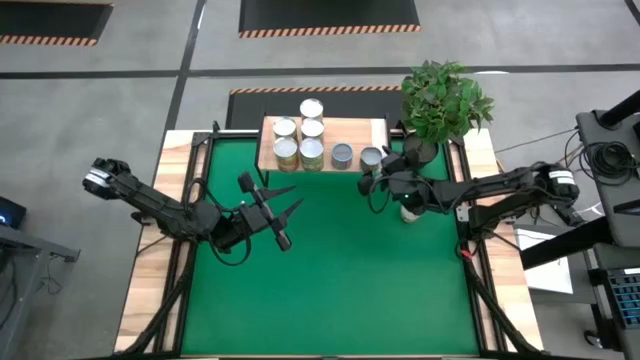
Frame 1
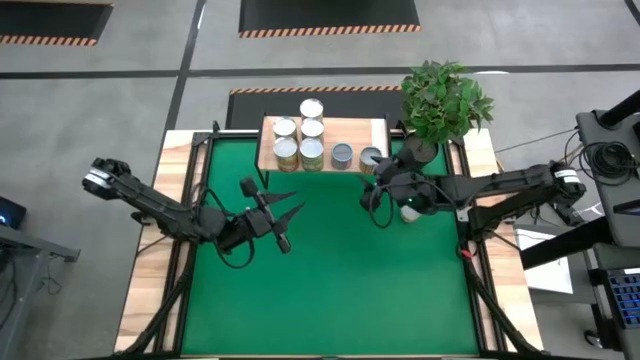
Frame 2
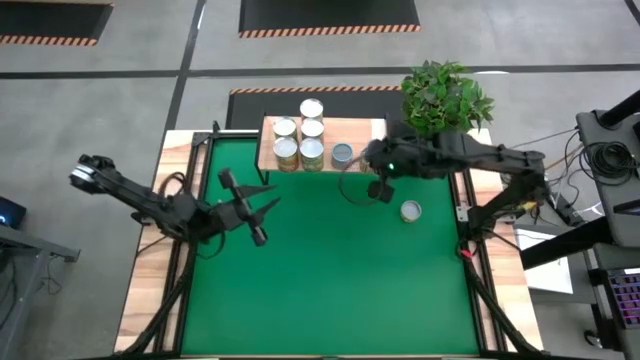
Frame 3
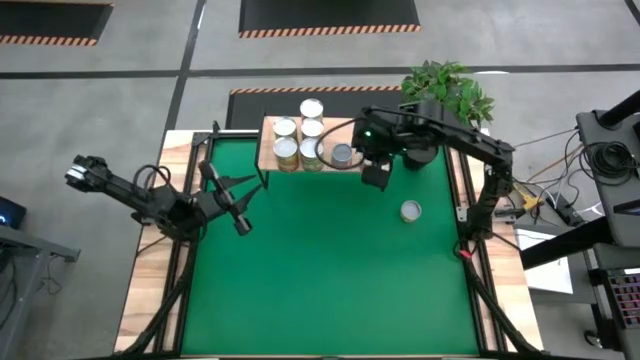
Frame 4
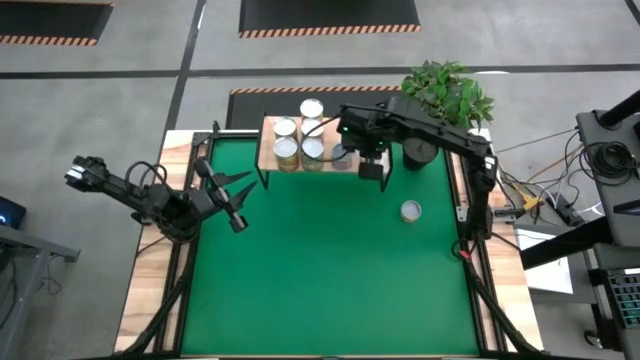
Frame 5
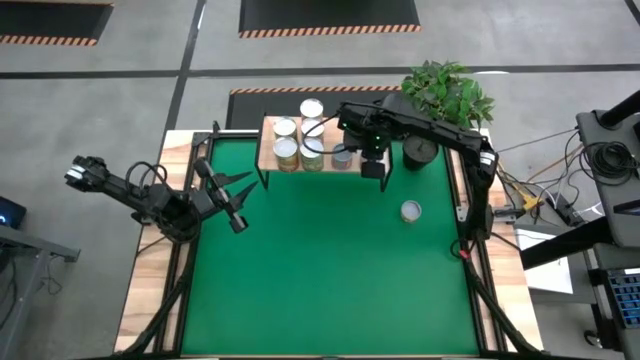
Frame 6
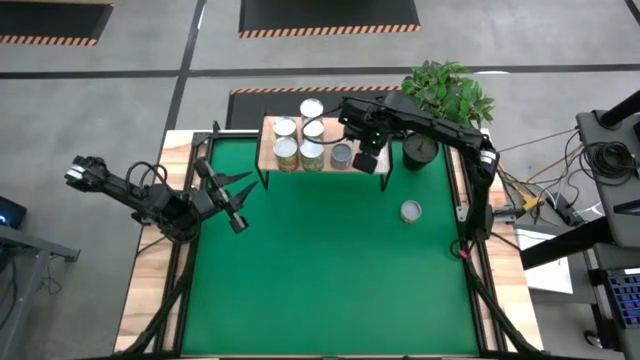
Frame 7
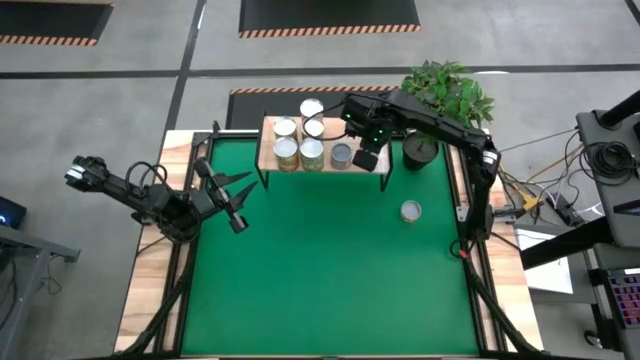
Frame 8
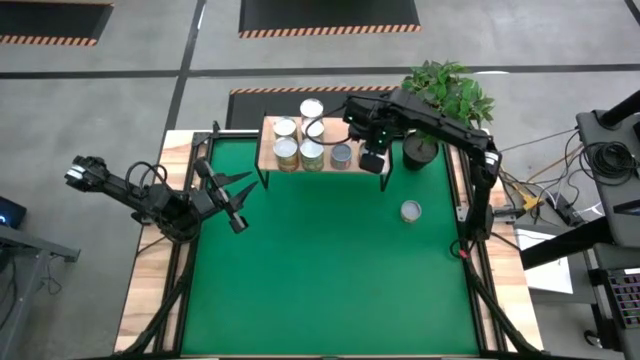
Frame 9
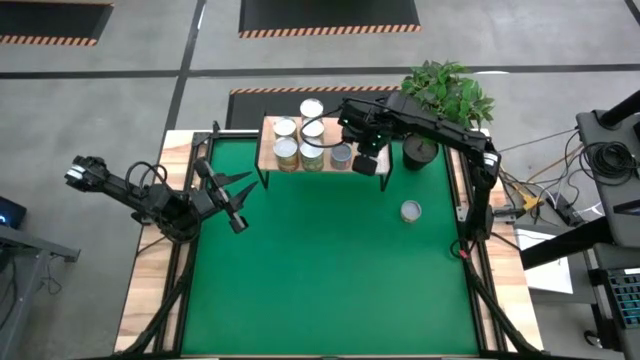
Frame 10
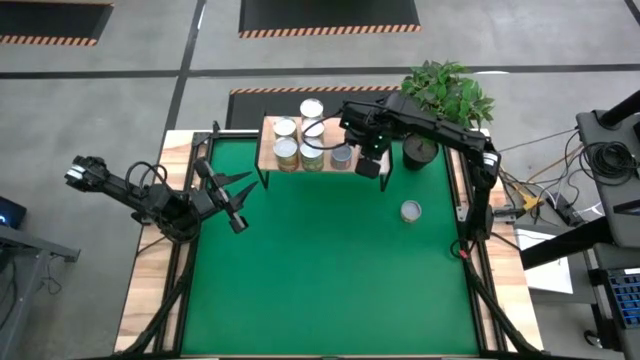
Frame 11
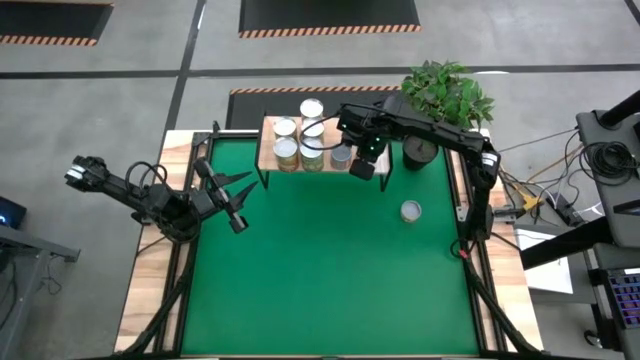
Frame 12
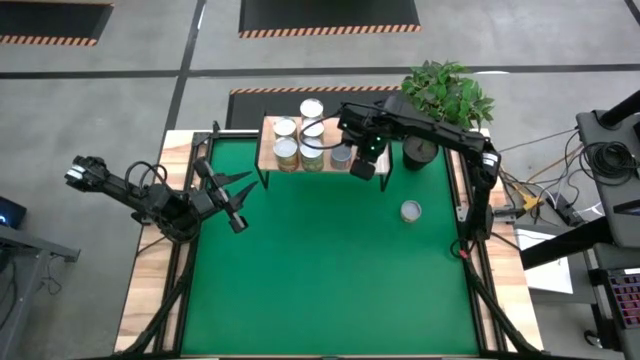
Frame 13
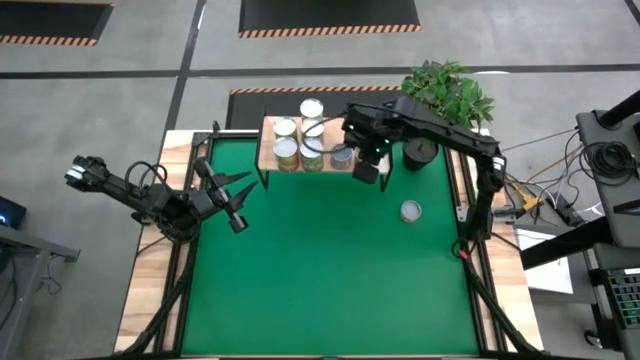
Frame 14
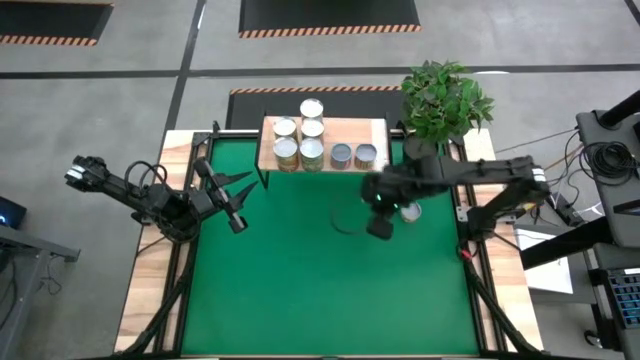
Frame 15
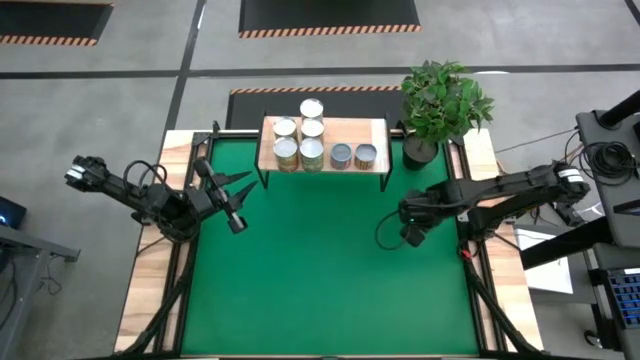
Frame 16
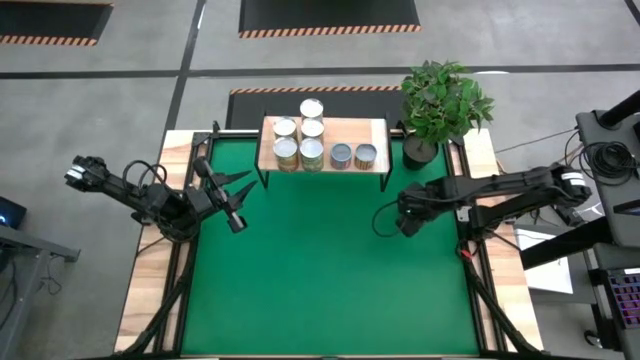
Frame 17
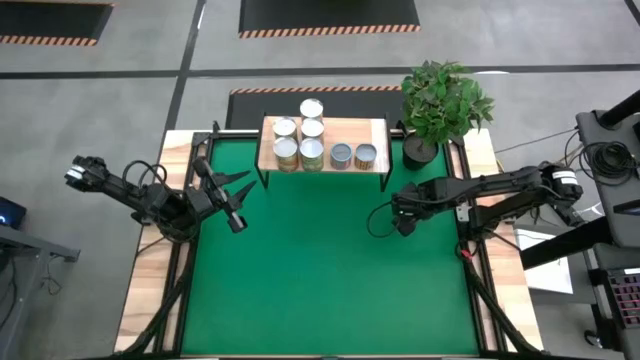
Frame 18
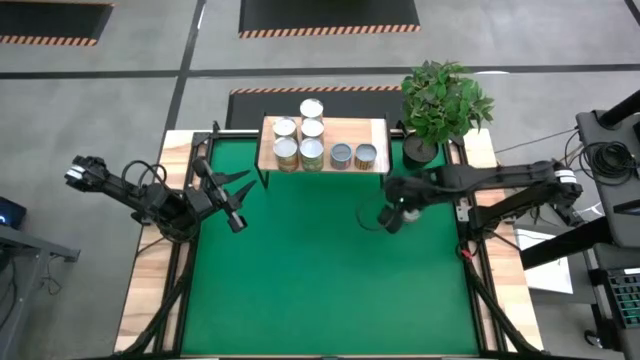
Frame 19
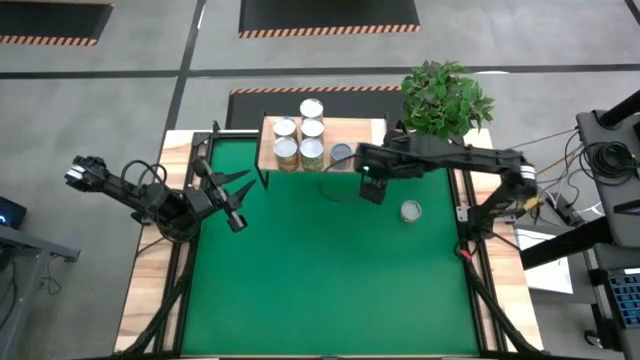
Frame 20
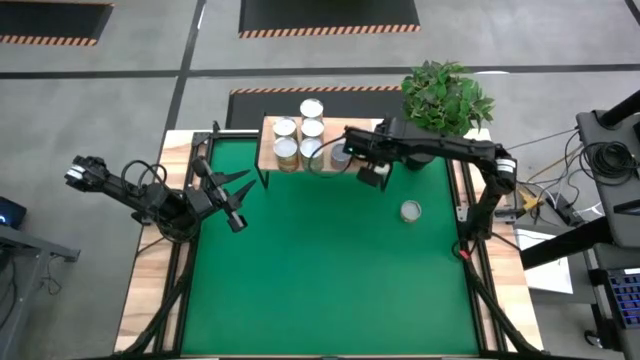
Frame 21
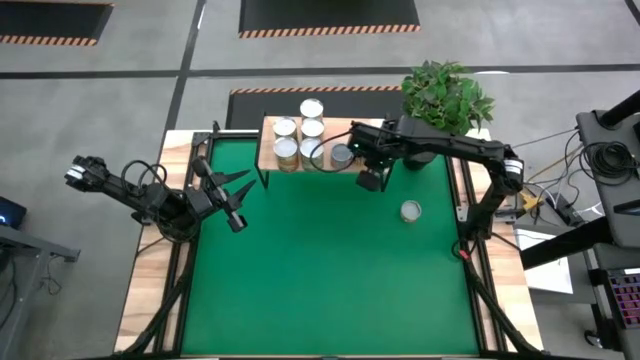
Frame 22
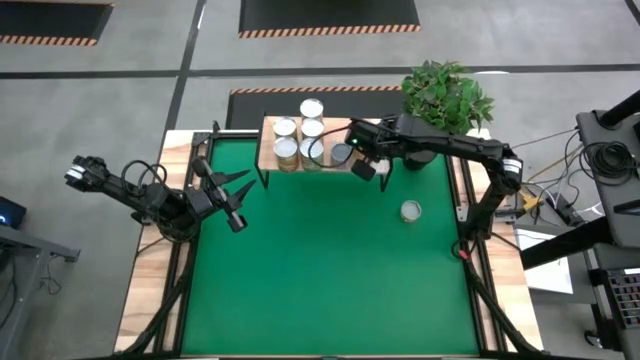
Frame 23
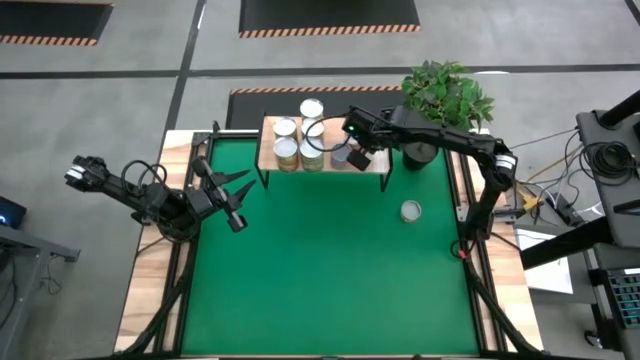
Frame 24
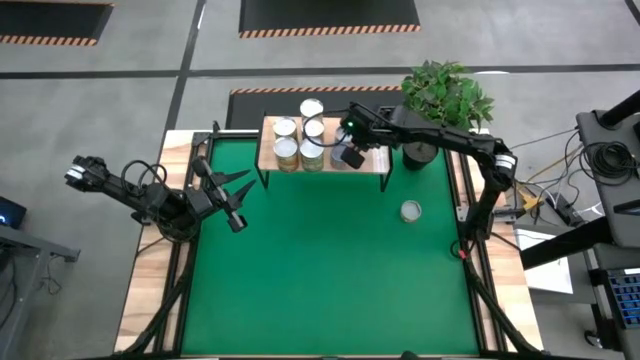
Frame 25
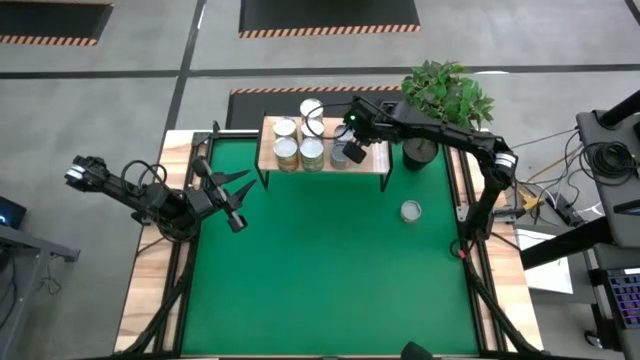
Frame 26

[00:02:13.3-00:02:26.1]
Task: Pick and place cans onto a shelf
Put the small canned beans on the shelf

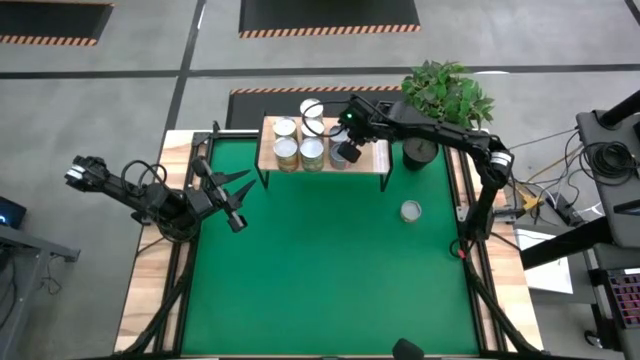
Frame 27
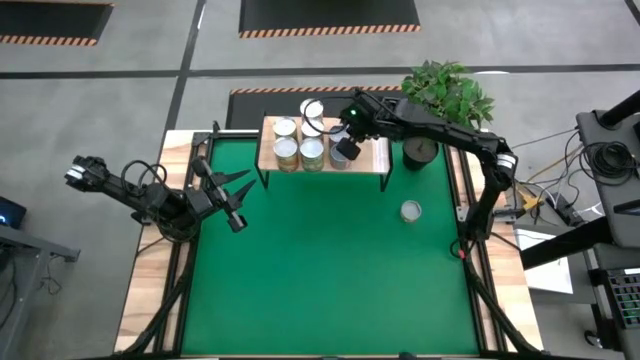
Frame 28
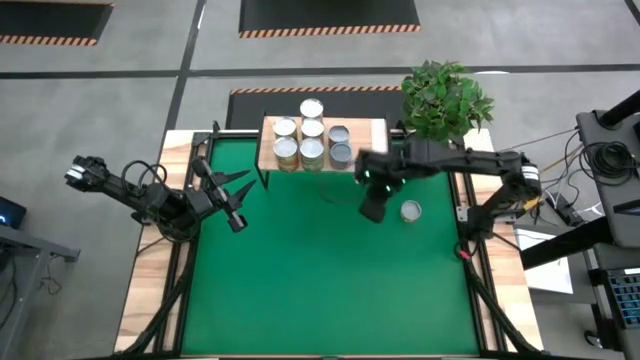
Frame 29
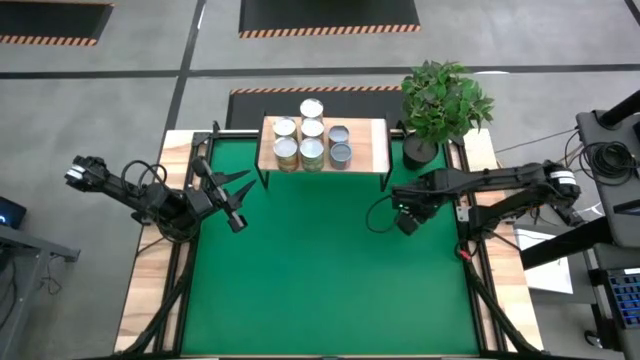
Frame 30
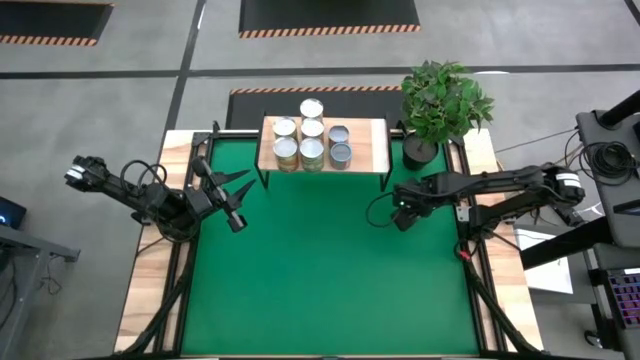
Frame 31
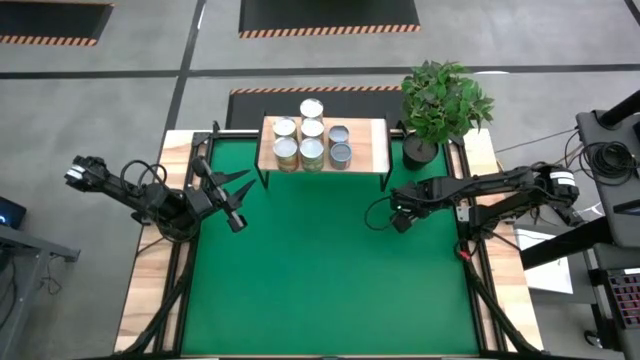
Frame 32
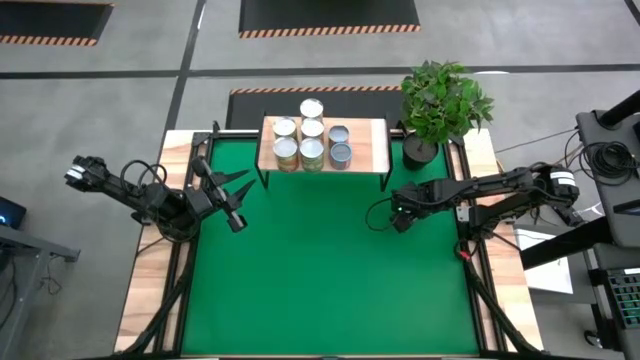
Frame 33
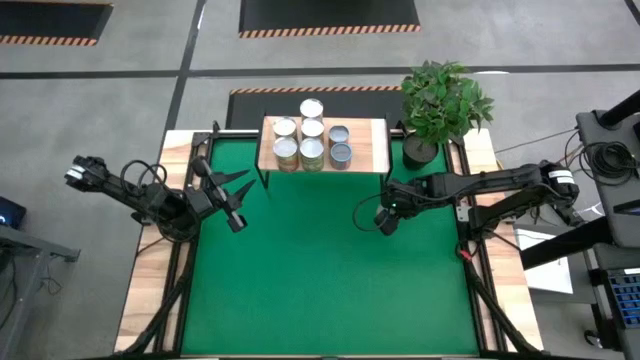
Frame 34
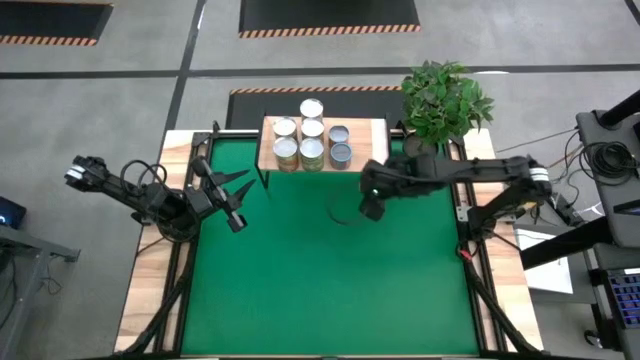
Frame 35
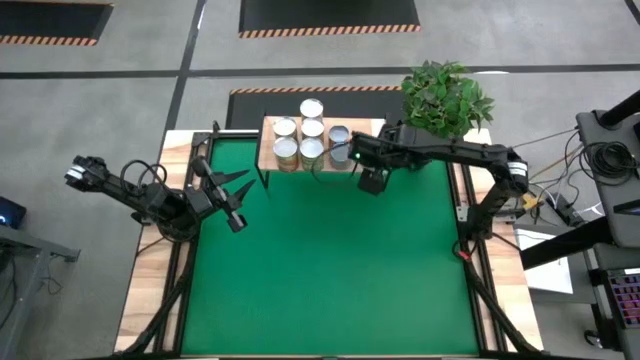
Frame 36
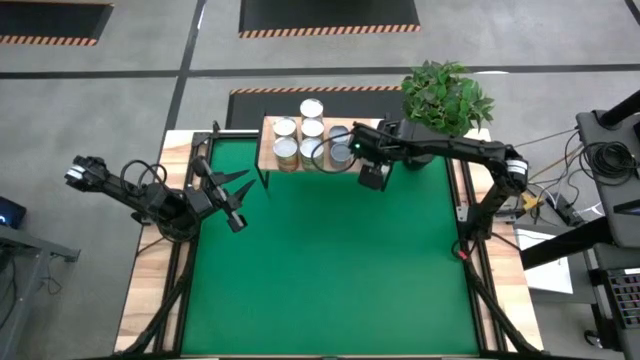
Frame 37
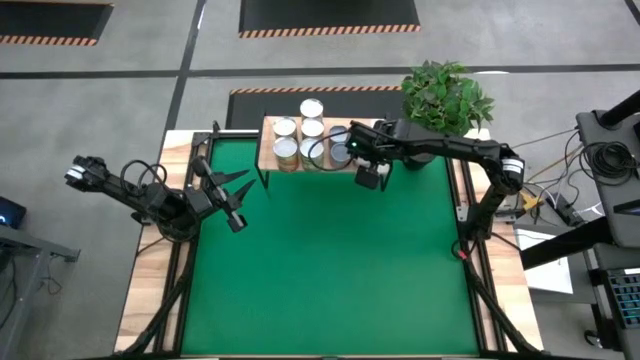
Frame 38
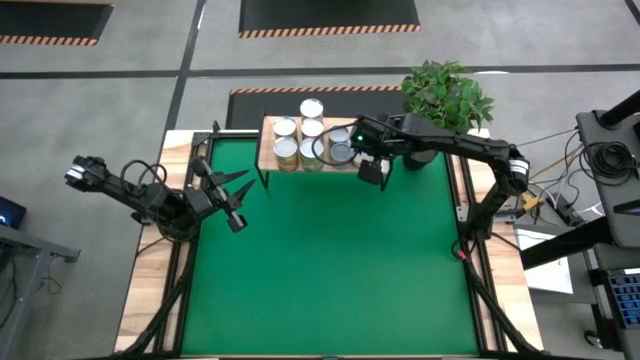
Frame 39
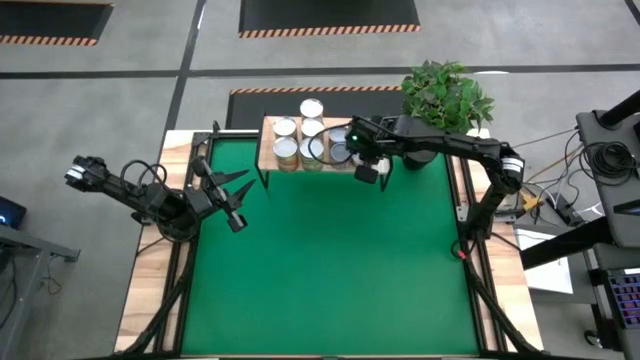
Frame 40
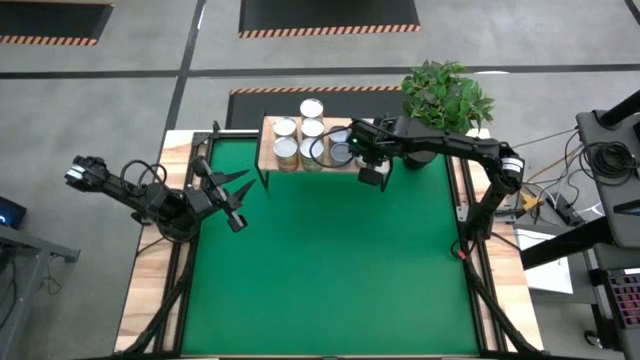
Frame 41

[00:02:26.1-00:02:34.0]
Put the canned mushroom on the shelf
